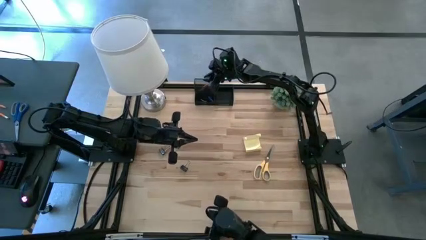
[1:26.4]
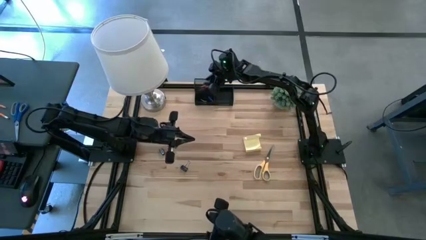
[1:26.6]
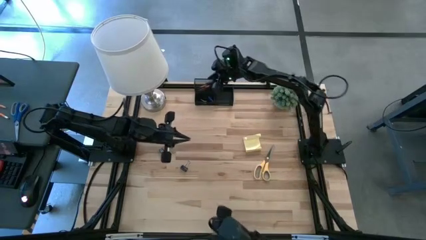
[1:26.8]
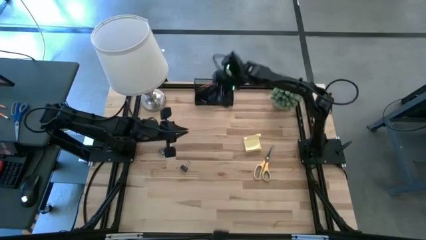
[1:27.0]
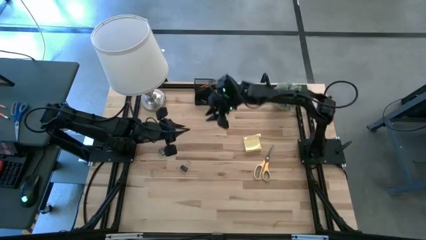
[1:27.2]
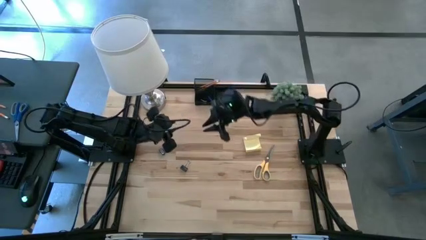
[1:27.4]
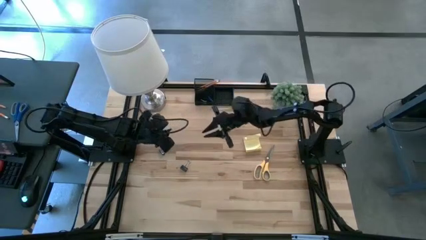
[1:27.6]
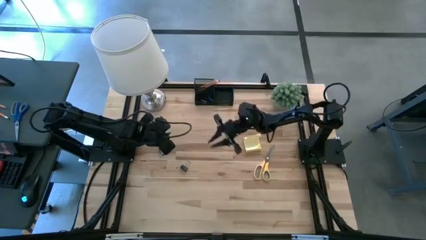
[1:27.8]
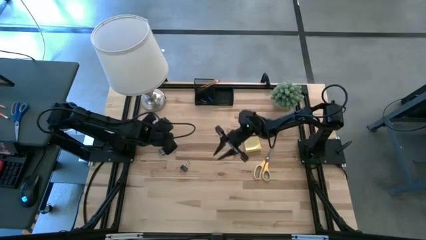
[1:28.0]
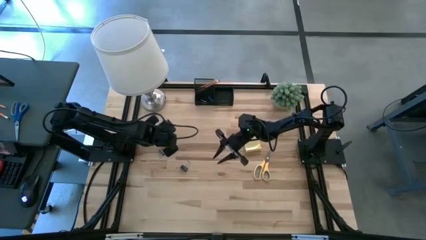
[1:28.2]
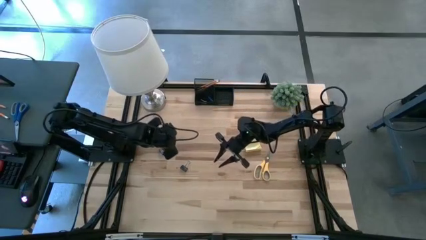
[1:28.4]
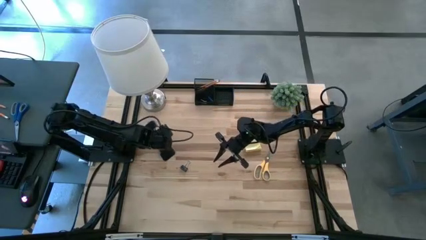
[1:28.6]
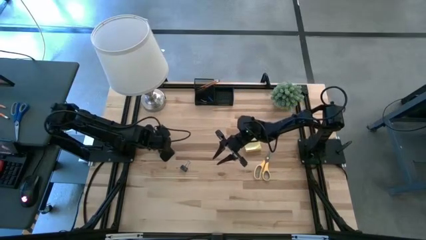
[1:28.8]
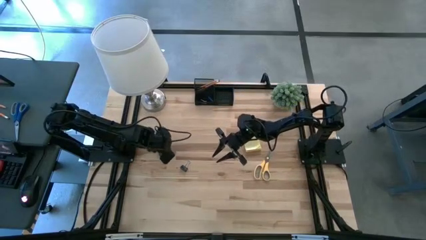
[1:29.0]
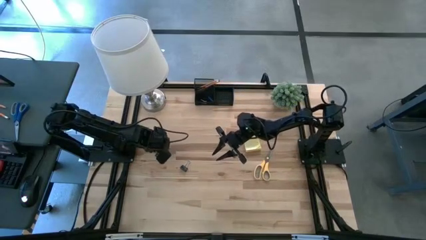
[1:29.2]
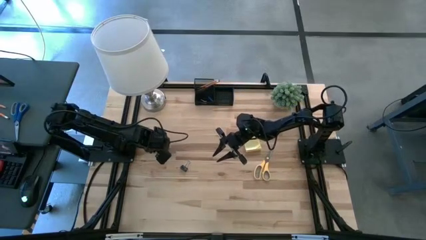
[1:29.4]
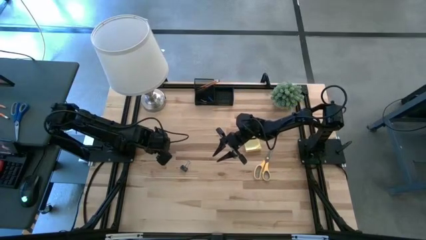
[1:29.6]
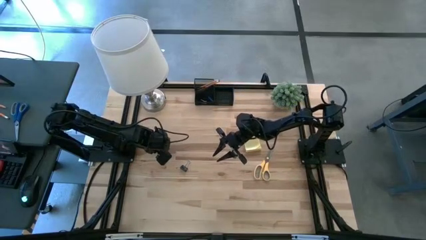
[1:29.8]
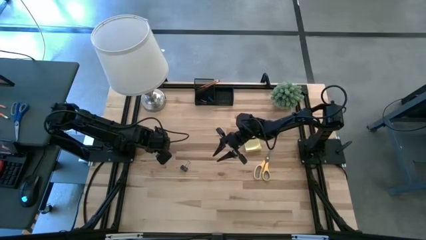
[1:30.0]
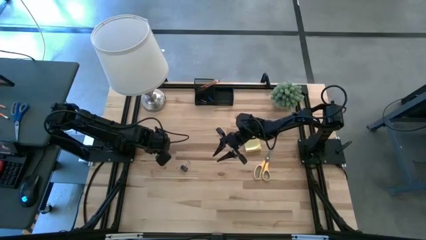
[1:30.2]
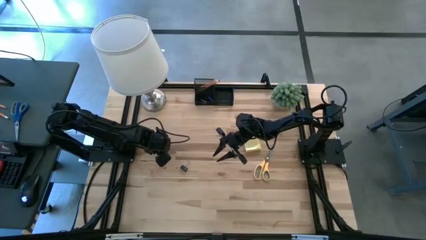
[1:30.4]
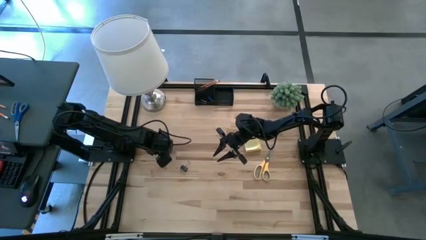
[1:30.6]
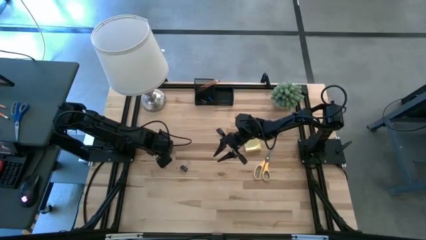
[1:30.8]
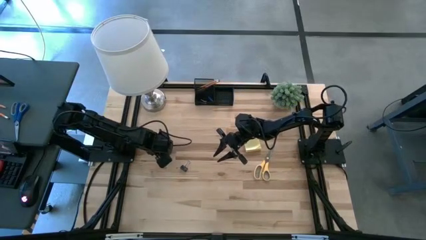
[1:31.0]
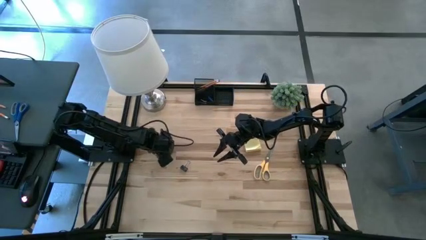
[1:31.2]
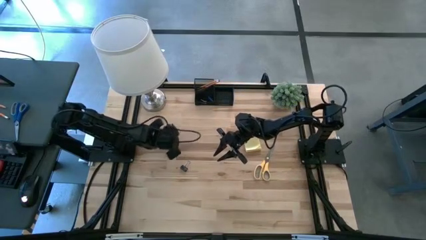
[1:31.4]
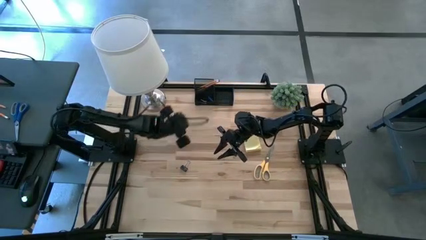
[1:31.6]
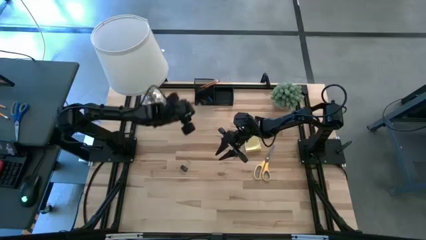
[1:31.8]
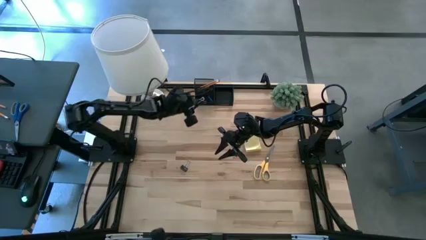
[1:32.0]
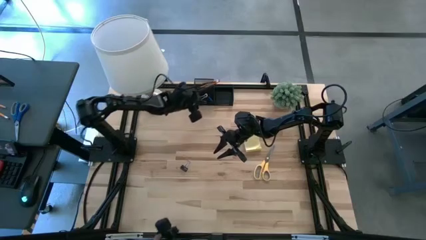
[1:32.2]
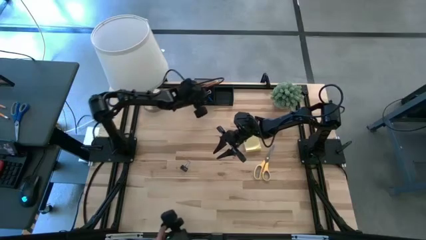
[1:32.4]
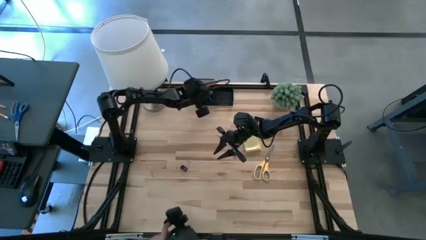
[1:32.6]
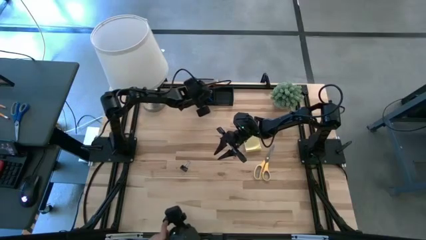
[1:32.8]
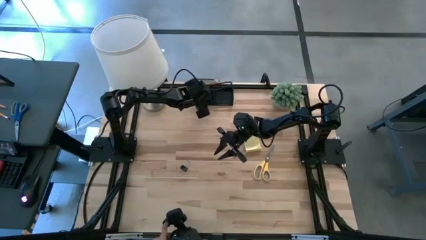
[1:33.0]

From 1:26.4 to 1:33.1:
Task: Pick and place office supplies into organizer
Put the black left binder clip into the black desk organizer

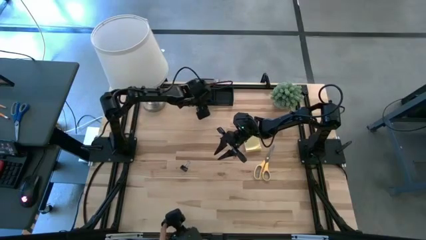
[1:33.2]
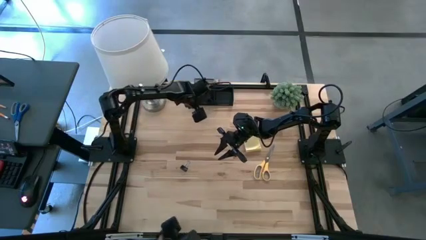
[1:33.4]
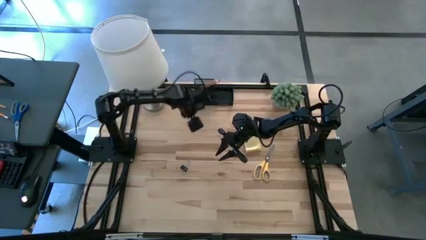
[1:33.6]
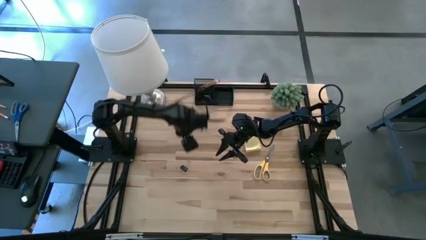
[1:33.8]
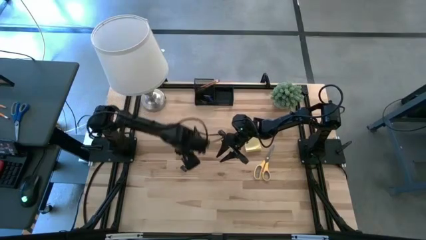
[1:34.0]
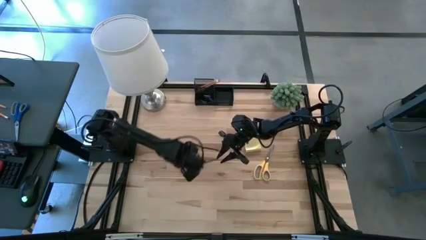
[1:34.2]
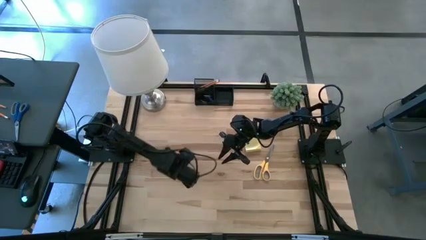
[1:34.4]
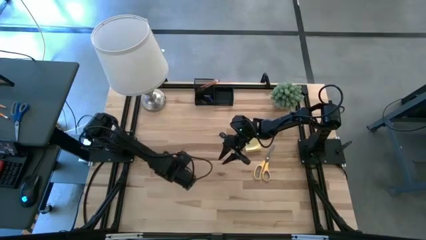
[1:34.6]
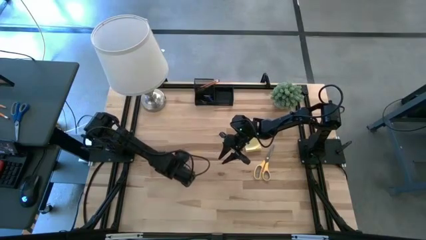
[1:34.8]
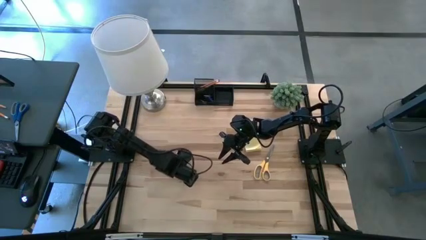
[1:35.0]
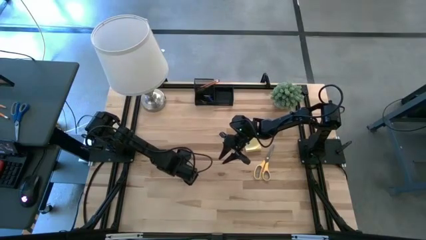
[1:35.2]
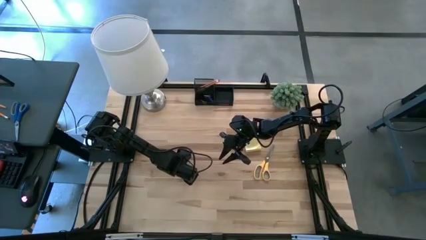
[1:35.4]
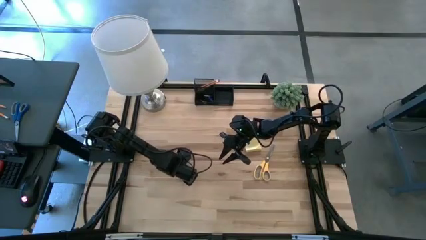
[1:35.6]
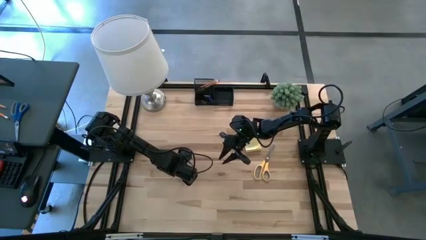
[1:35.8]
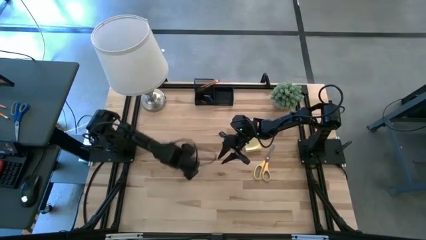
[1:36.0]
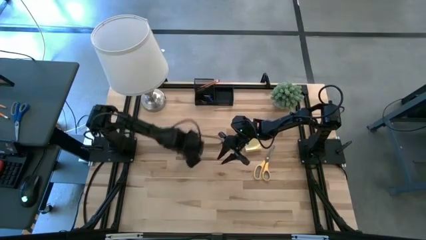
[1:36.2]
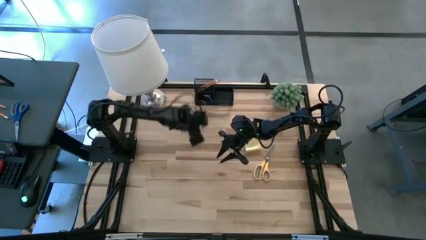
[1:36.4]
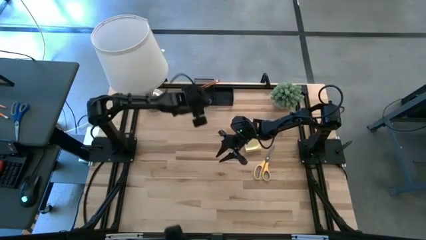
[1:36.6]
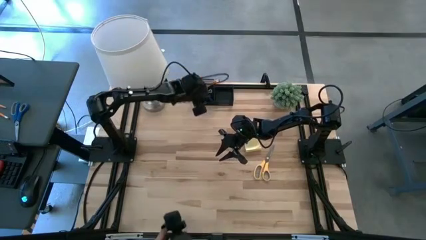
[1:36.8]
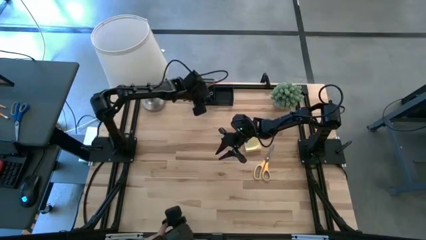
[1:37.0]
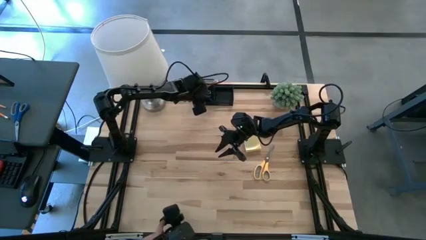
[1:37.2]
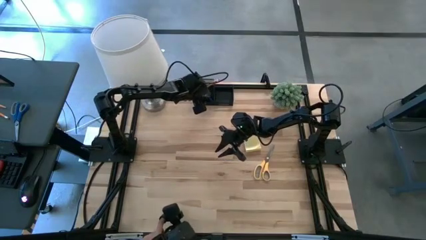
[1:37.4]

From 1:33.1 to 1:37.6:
Put the black binder clip into the black desk organizer

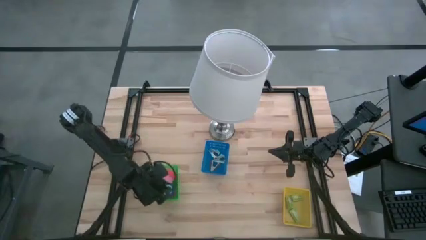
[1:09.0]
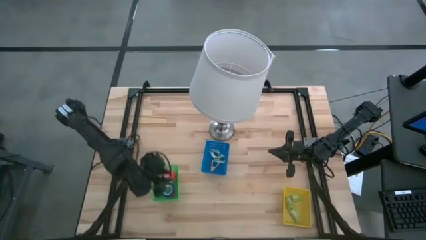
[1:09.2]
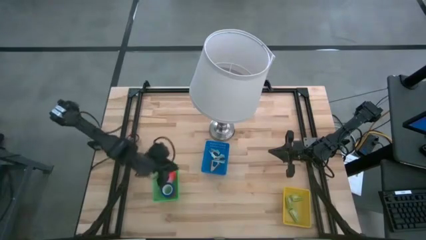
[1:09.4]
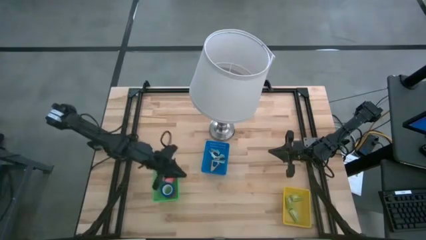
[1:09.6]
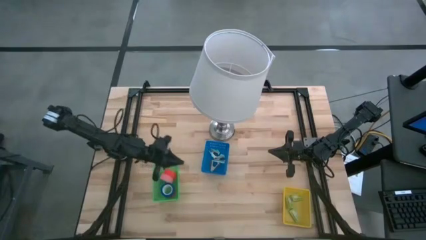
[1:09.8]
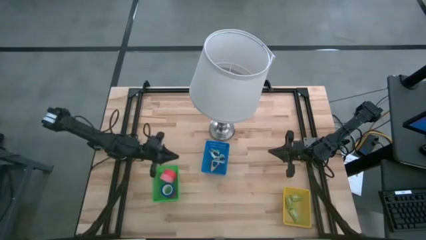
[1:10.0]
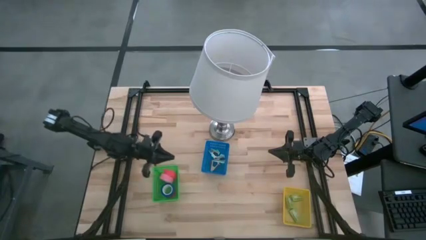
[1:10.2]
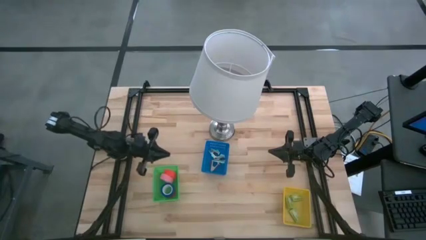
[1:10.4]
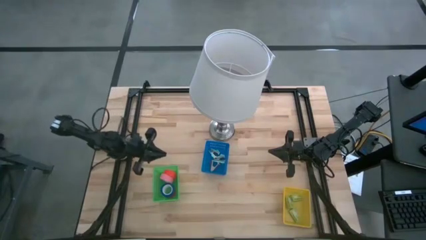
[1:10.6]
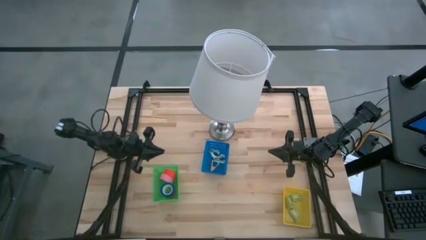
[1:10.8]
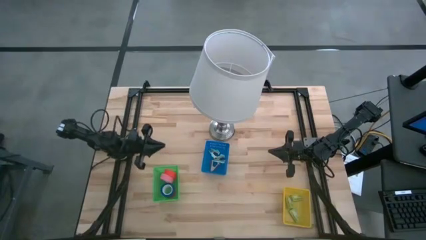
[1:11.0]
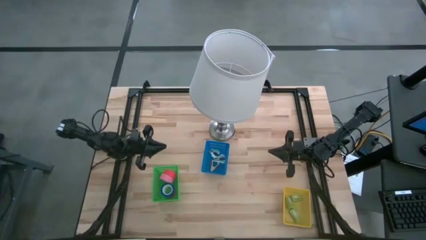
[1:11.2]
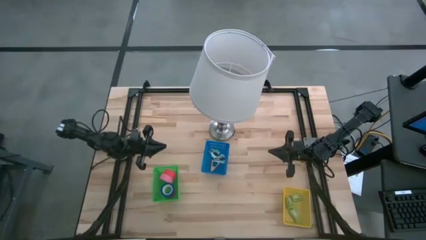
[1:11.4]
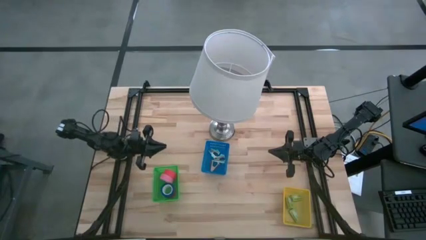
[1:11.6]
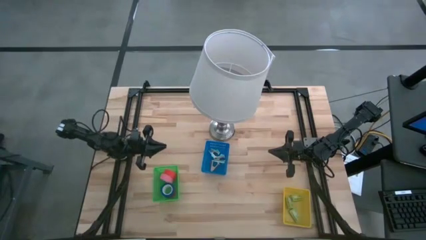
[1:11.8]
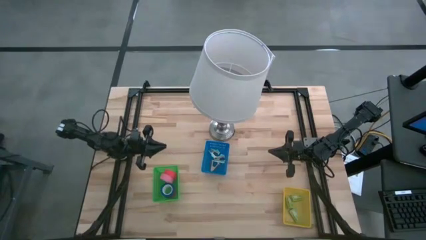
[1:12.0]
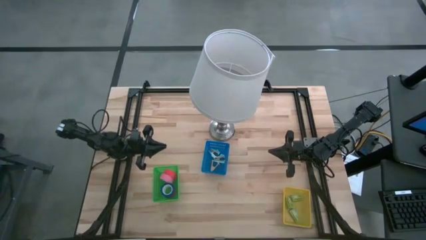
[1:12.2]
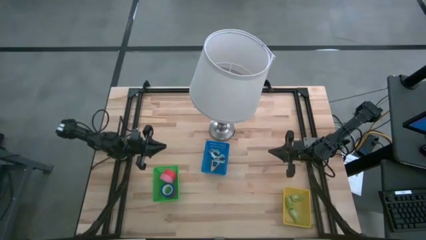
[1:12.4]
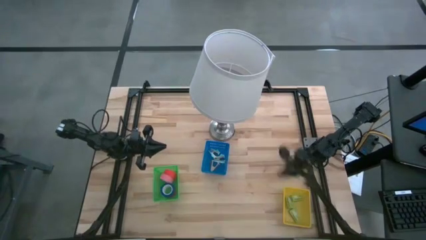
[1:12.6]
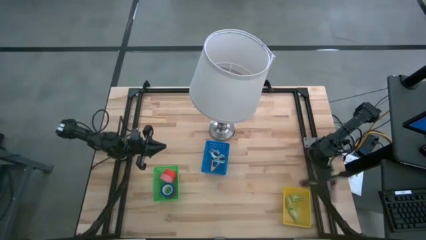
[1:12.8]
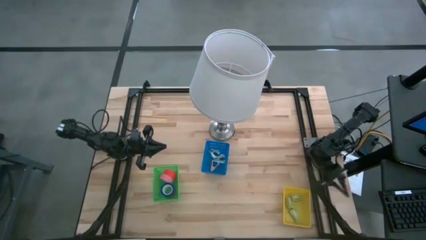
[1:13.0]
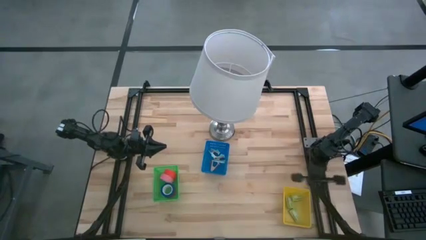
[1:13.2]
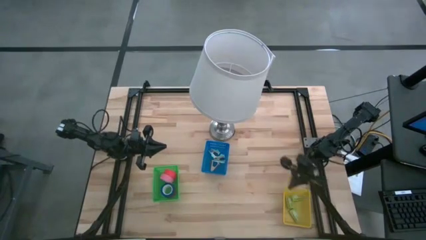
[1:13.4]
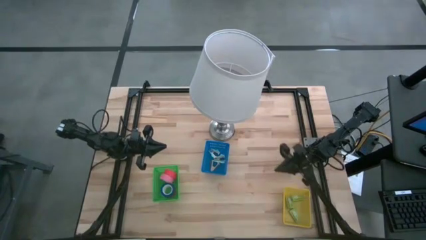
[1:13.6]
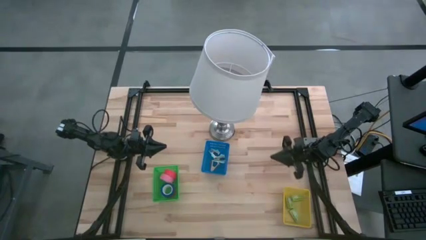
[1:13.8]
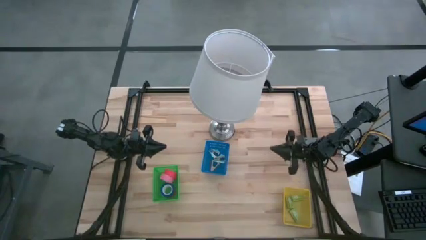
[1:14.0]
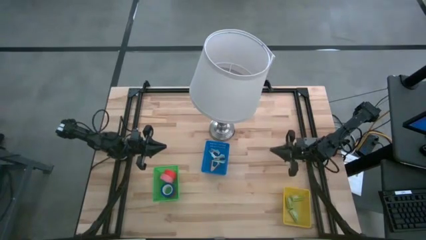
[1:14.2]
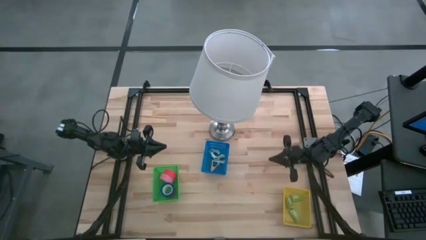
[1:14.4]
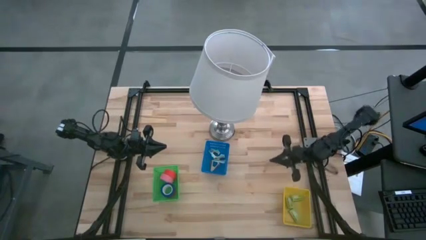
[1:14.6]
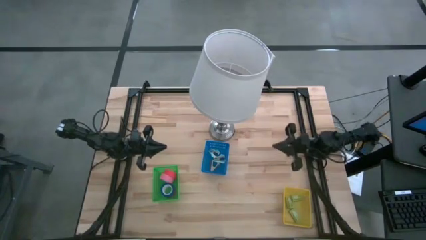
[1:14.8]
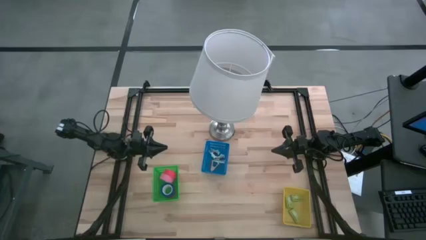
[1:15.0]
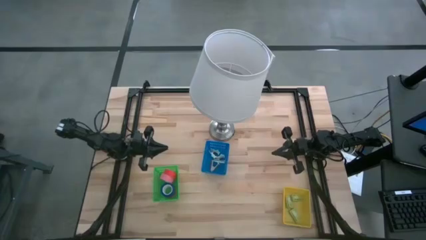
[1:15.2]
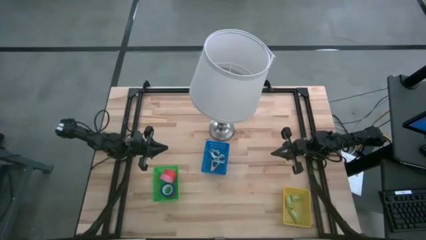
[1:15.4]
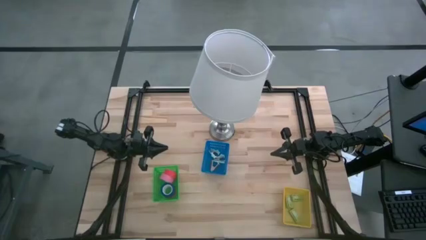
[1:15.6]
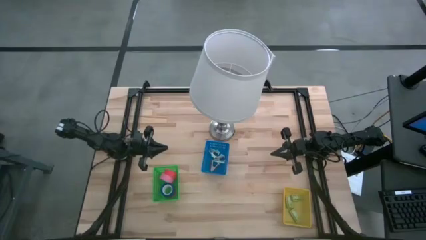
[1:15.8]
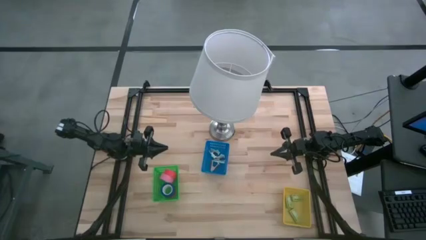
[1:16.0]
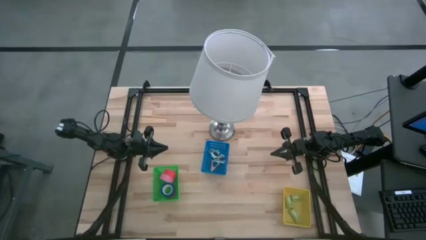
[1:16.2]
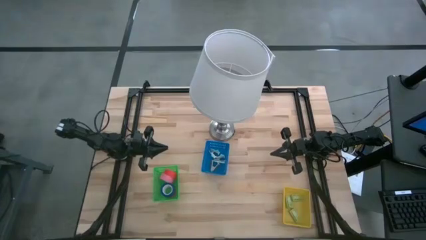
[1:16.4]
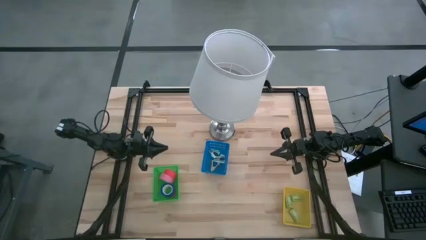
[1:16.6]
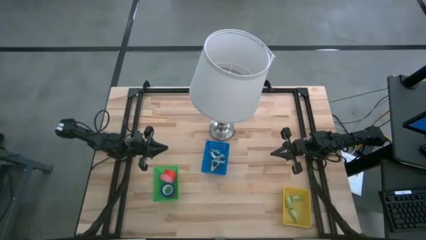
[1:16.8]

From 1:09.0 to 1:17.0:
Task: Pick and place Stapler, Stapler remover, tape
Return to Home Position
